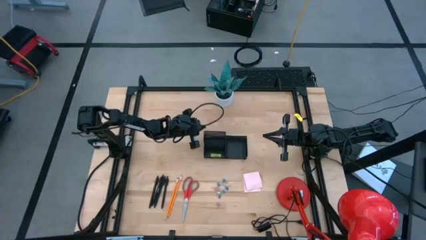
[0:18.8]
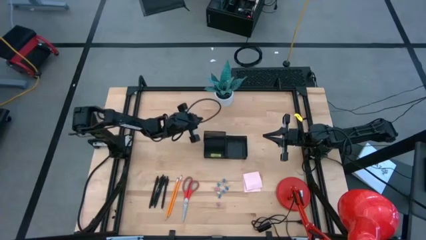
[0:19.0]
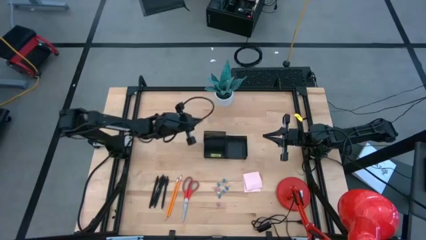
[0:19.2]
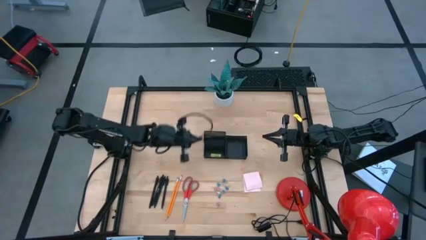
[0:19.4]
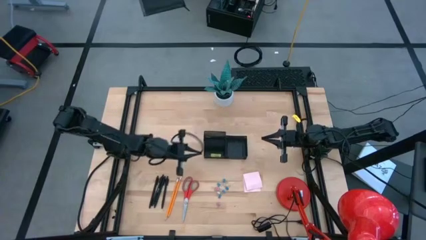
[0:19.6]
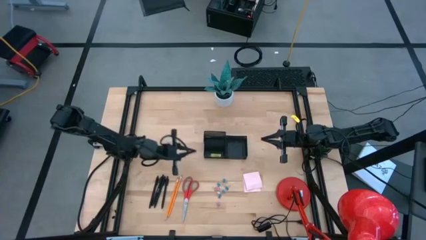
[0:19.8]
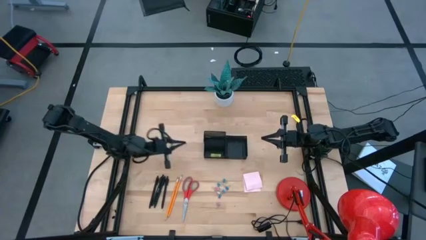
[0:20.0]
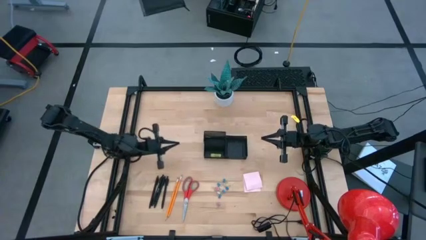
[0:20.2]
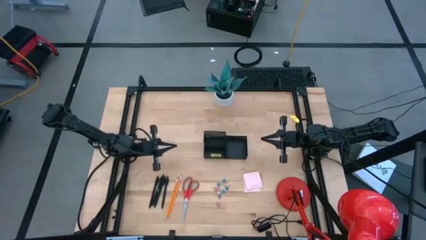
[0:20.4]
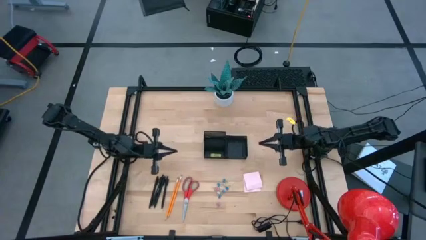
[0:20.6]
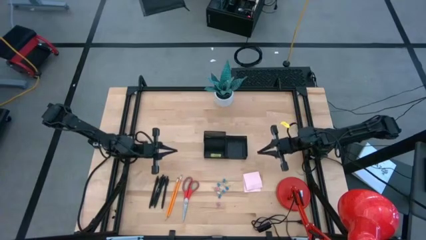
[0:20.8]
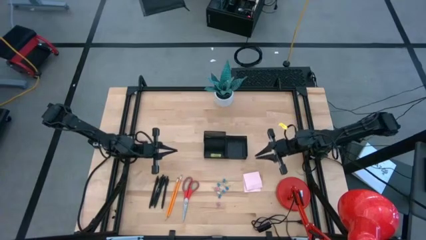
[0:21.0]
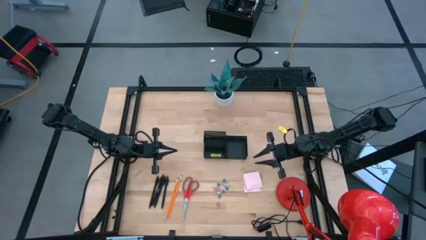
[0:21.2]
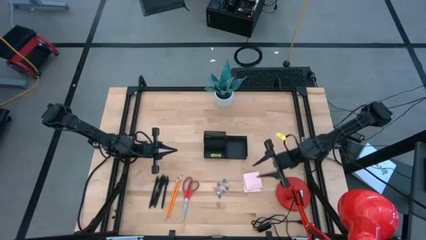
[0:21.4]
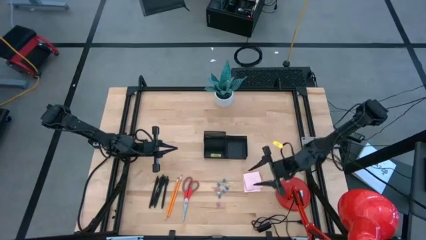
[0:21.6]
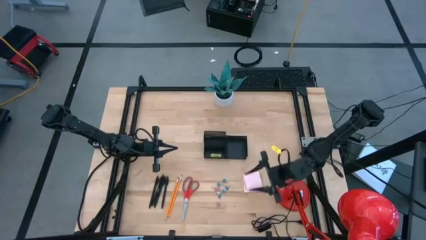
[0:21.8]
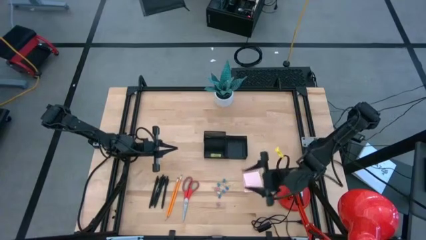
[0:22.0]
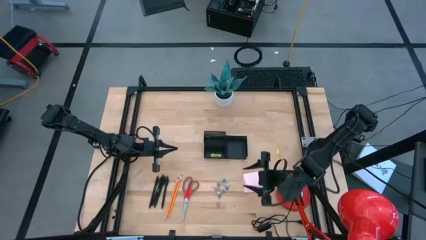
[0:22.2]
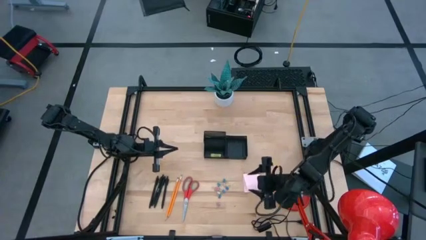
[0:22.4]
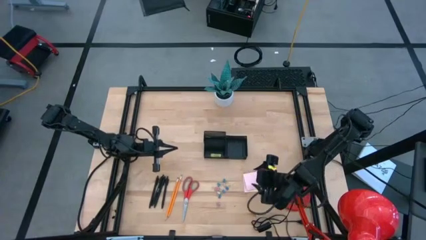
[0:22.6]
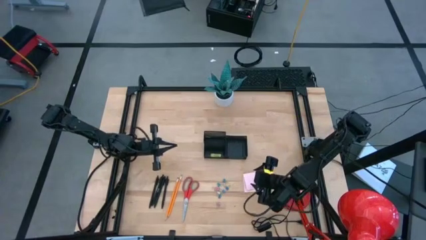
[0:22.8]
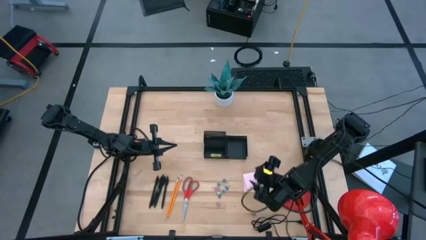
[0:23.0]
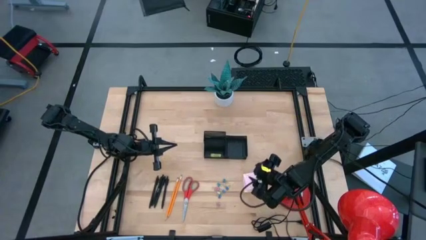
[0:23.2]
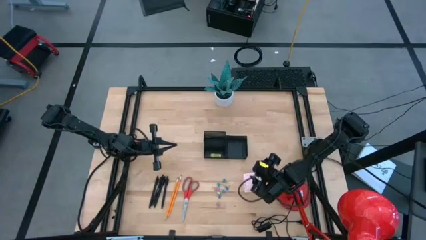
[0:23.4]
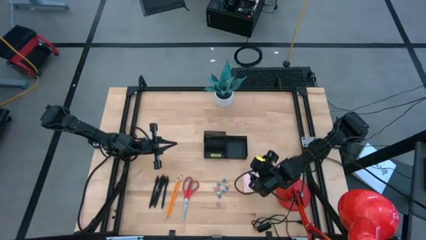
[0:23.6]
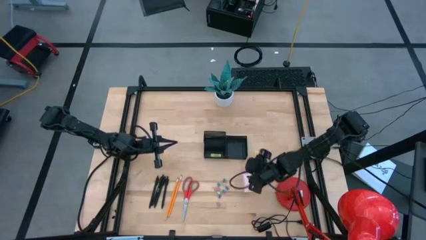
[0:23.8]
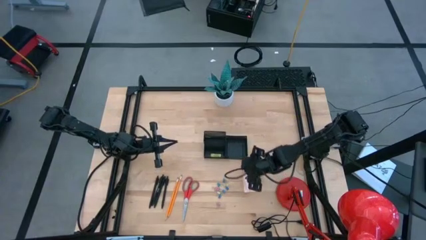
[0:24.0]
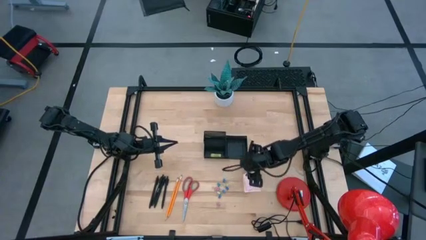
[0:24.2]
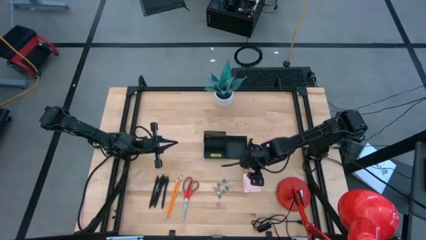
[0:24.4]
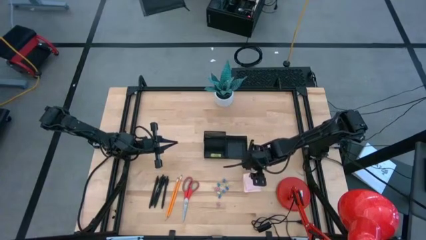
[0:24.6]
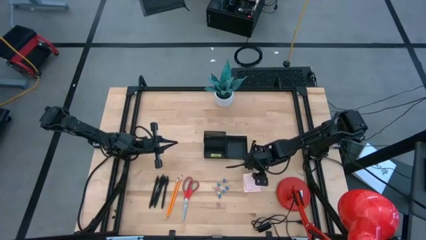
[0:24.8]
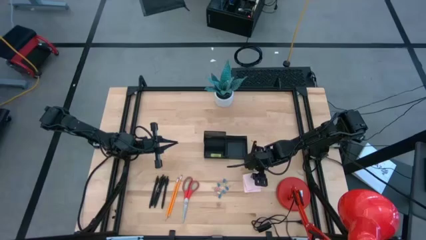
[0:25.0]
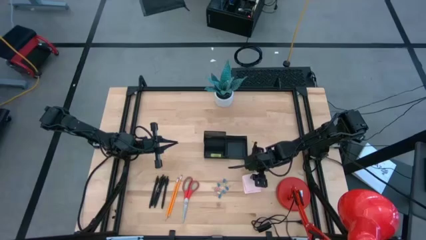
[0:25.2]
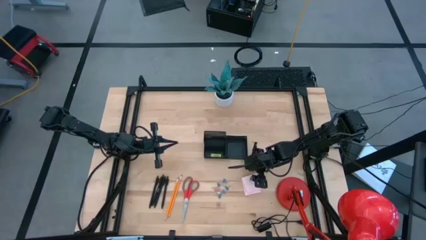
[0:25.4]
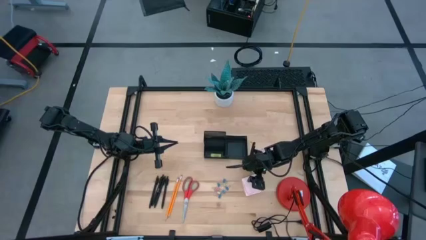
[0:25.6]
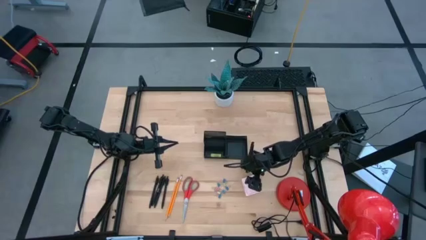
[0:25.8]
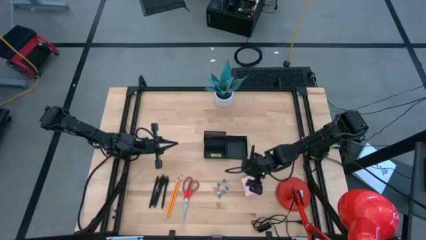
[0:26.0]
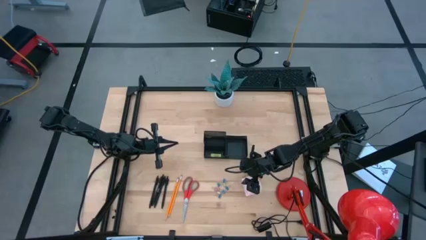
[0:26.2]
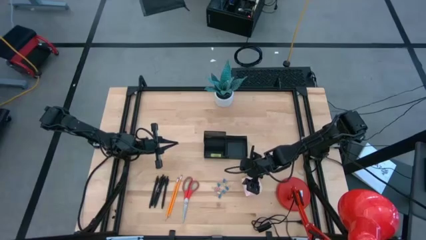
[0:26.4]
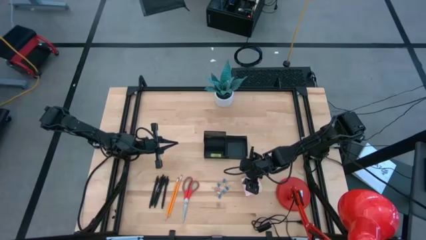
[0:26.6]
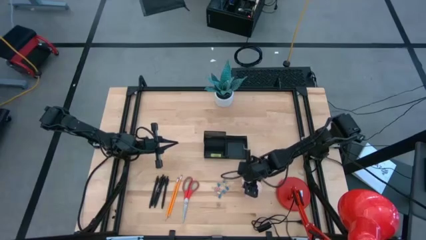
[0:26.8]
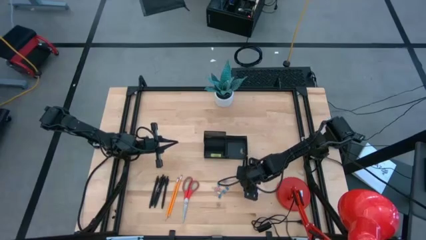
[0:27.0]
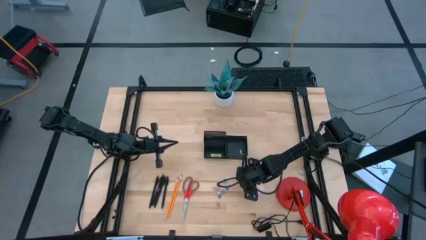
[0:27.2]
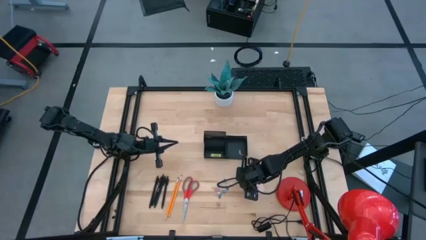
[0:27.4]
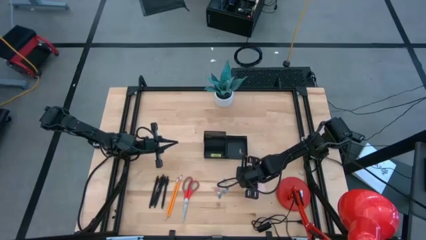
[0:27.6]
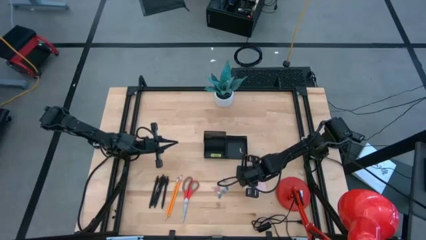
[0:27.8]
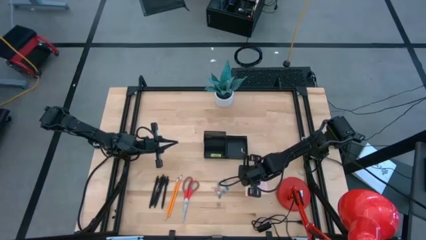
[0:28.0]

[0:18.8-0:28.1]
Task: Pick and place office supplies into organizer
Put the pink sticky notes into the desk organizer

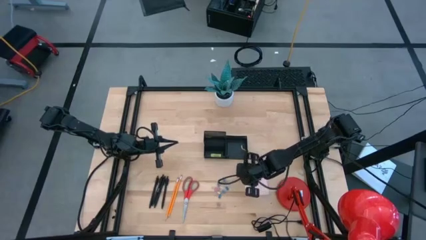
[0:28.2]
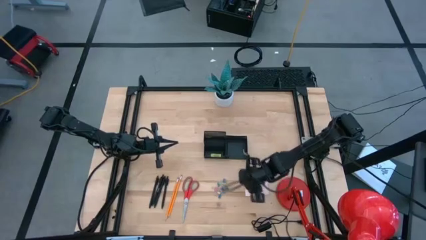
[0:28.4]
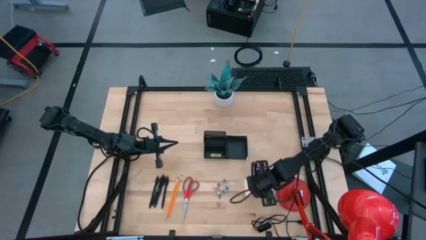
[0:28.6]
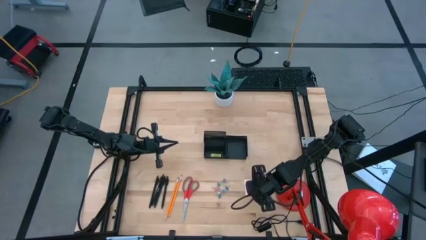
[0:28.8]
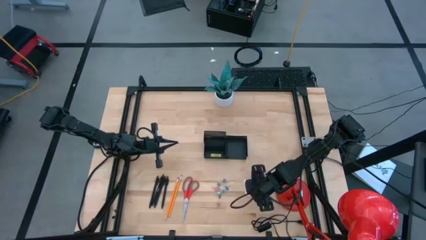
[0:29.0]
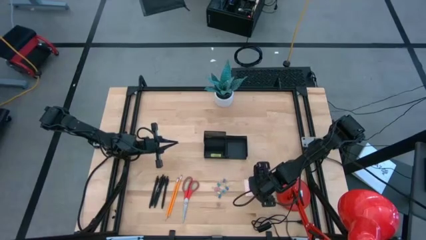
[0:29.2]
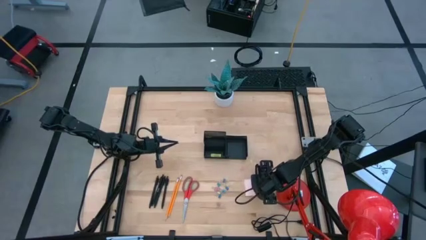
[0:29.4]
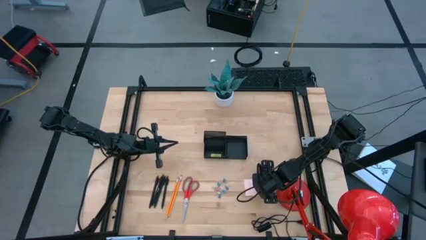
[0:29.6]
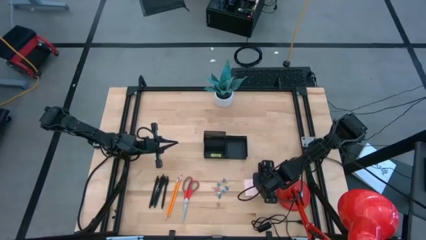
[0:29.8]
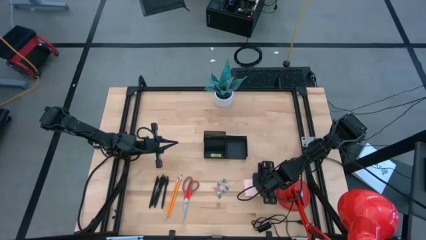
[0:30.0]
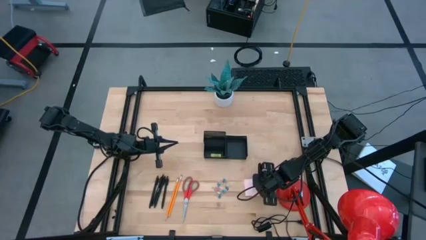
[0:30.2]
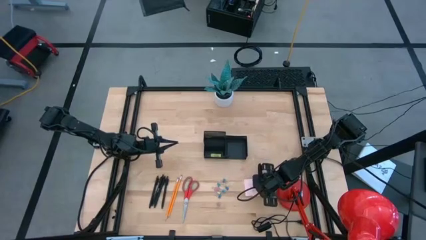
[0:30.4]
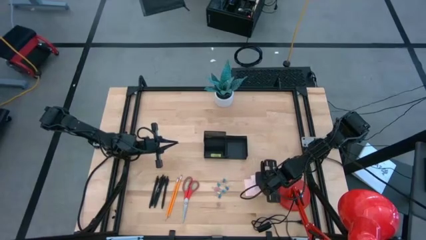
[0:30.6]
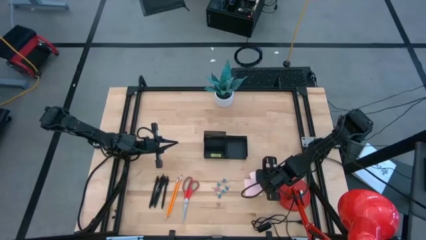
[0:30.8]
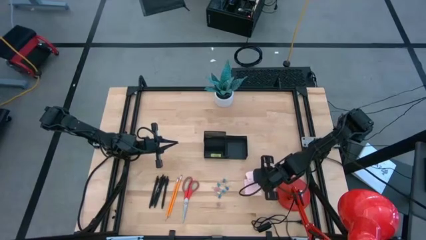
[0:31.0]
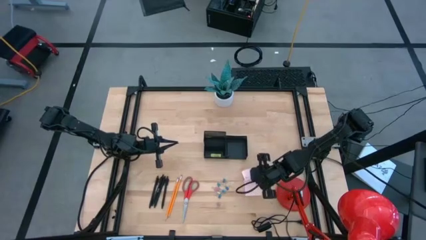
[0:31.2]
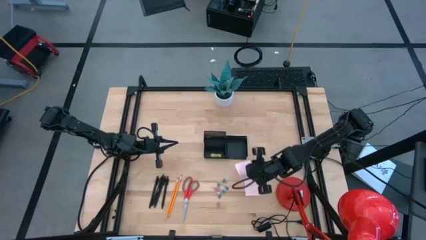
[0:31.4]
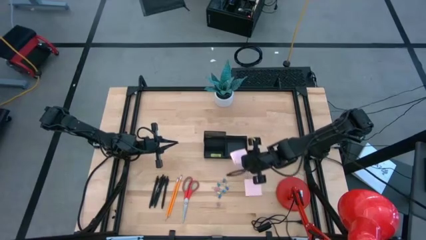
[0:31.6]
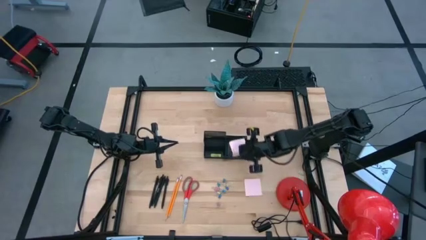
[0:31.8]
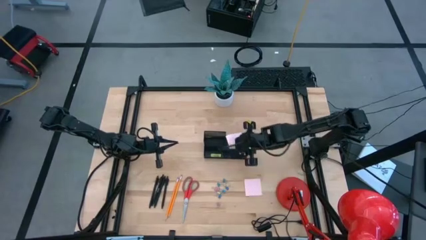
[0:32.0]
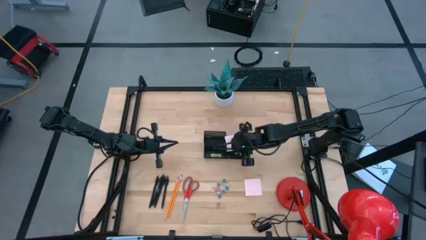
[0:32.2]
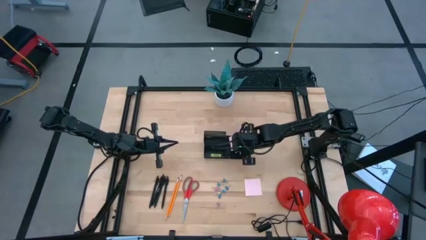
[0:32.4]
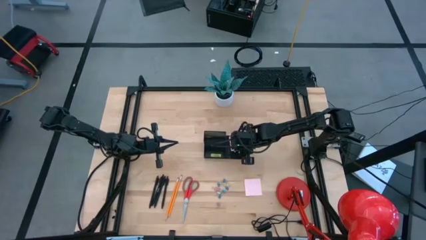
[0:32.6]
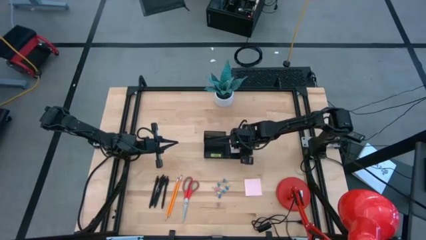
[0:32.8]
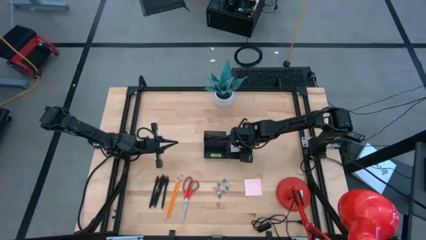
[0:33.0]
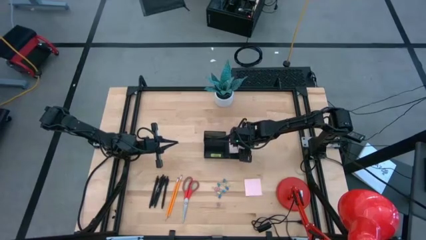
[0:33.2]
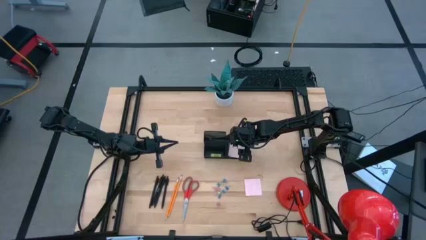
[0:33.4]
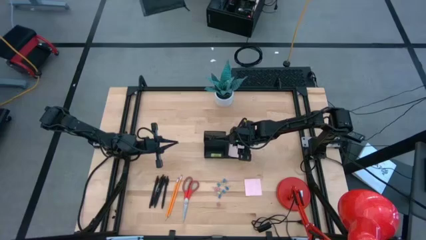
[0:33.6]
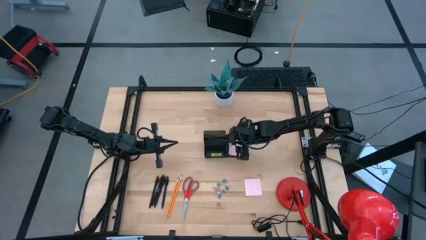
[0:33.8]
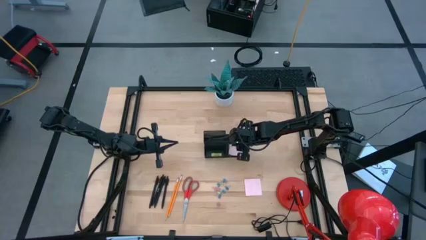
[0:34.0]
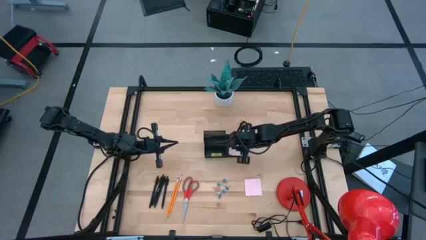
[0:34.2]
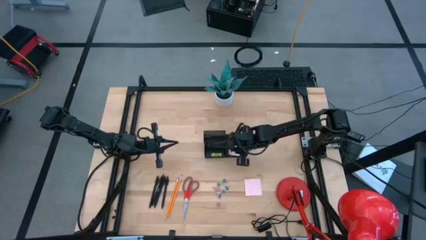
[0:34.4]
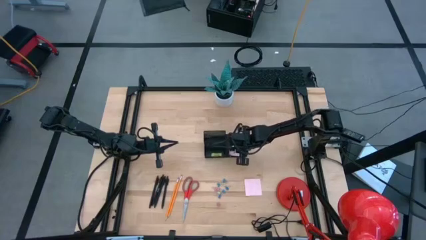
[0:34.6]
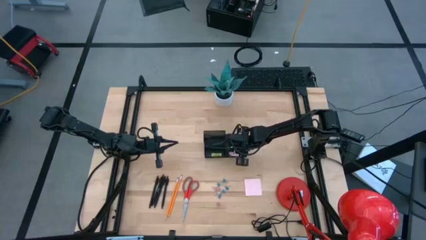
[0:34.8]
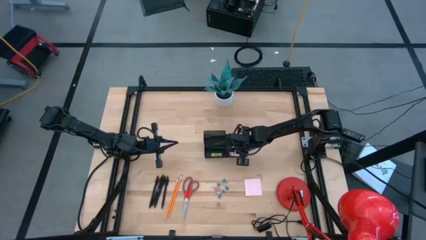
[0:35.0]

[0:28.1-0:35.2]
Put the pink sticky notes into the desk organizer
